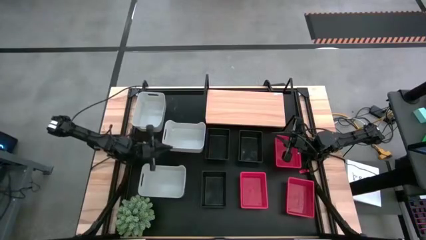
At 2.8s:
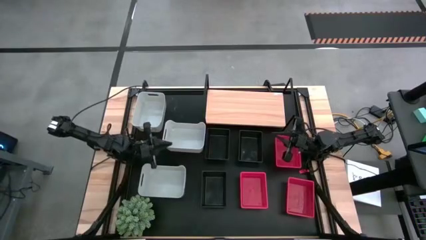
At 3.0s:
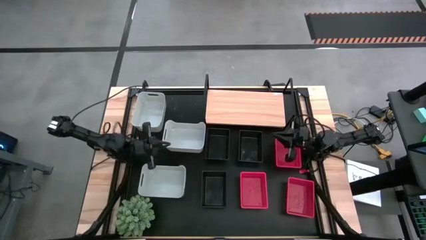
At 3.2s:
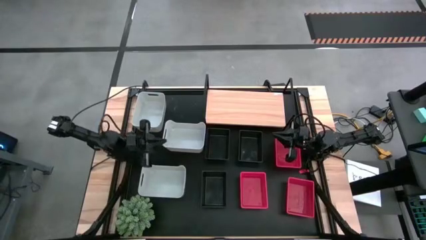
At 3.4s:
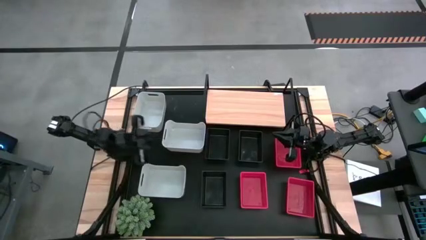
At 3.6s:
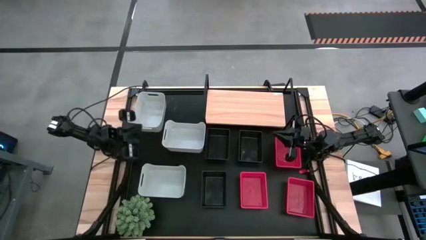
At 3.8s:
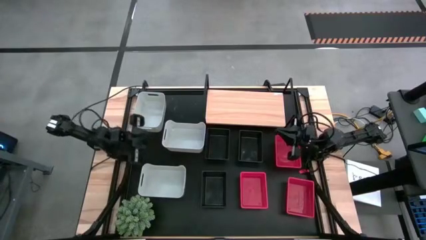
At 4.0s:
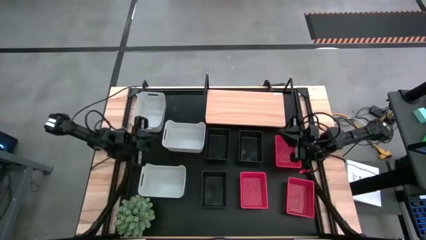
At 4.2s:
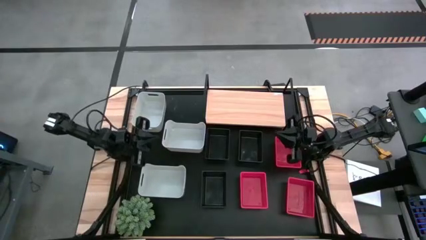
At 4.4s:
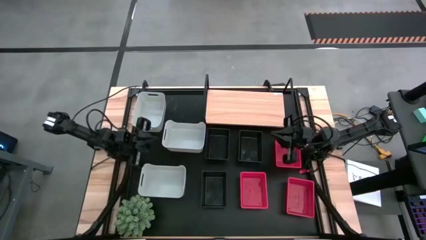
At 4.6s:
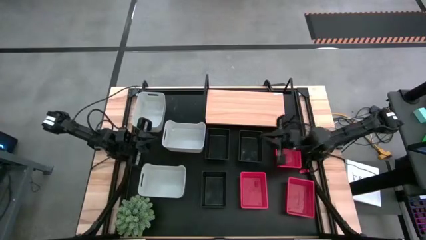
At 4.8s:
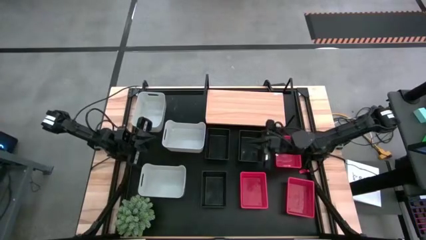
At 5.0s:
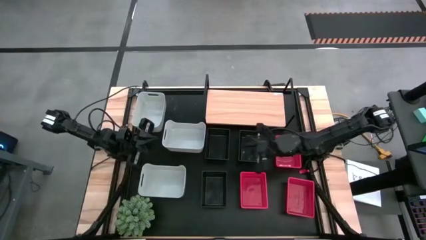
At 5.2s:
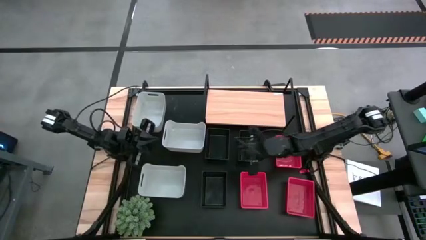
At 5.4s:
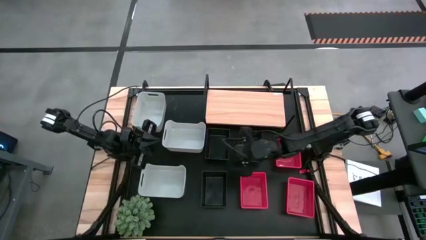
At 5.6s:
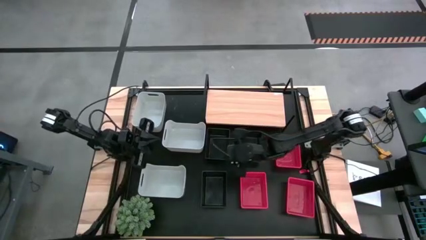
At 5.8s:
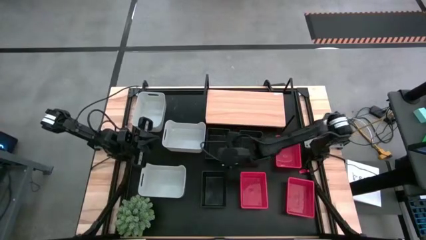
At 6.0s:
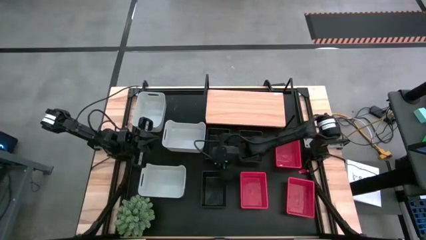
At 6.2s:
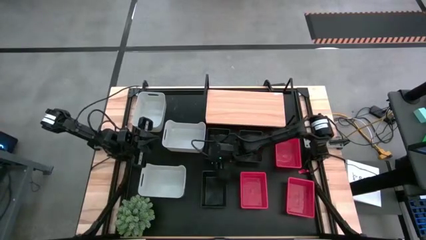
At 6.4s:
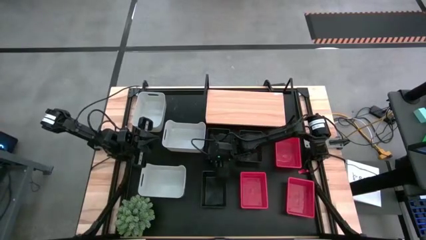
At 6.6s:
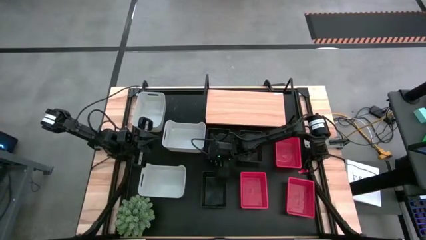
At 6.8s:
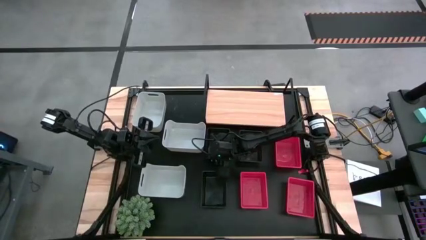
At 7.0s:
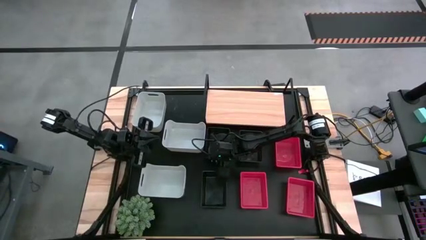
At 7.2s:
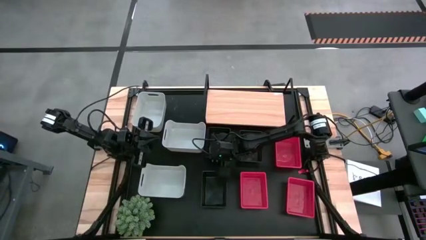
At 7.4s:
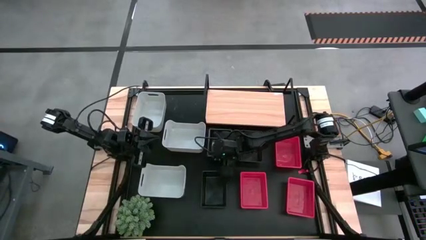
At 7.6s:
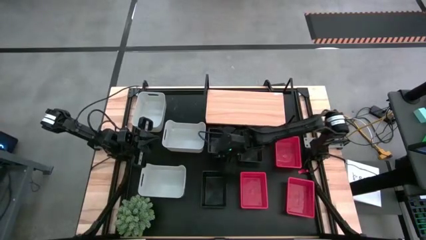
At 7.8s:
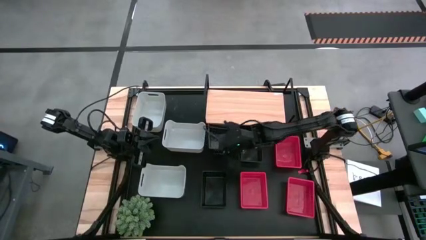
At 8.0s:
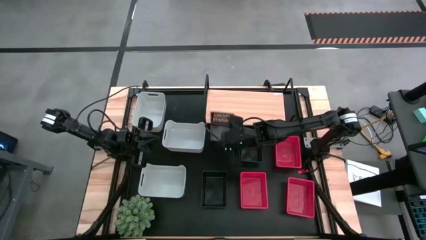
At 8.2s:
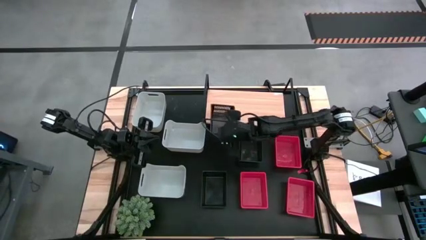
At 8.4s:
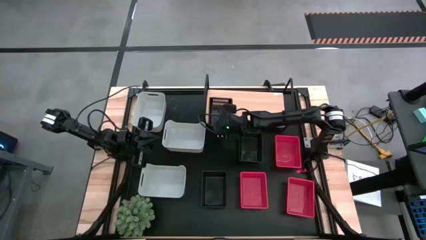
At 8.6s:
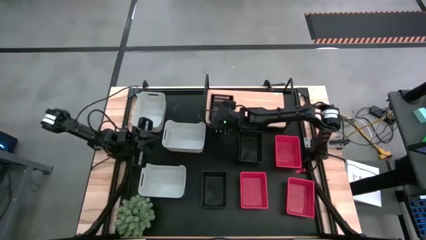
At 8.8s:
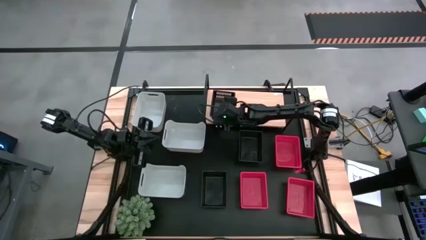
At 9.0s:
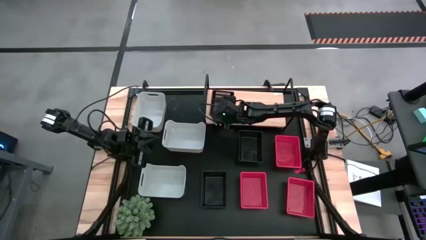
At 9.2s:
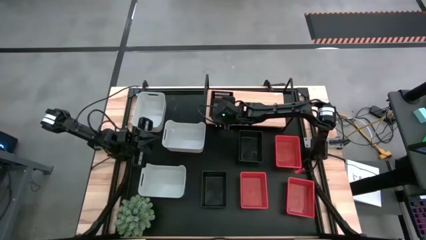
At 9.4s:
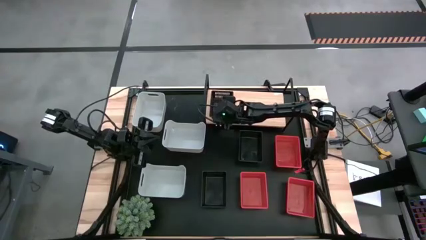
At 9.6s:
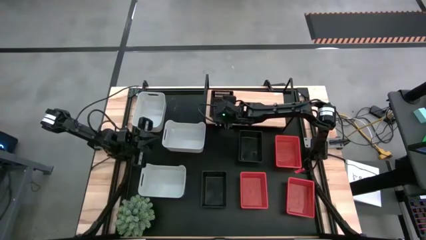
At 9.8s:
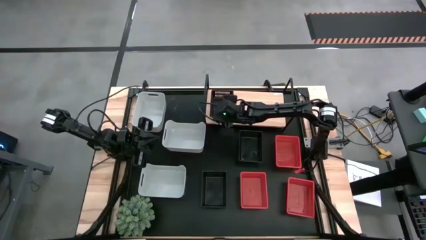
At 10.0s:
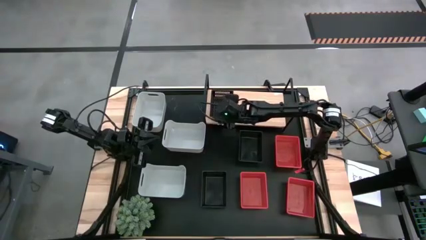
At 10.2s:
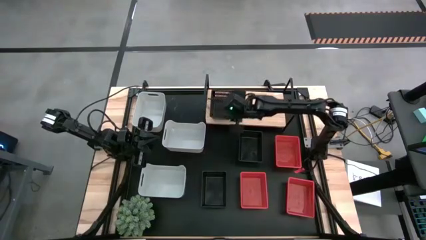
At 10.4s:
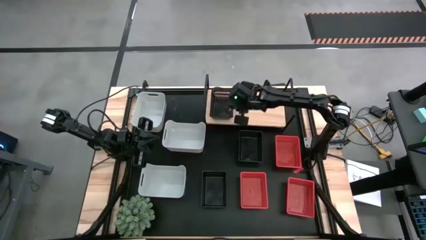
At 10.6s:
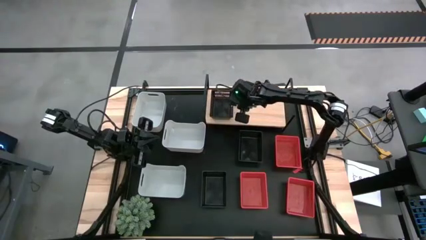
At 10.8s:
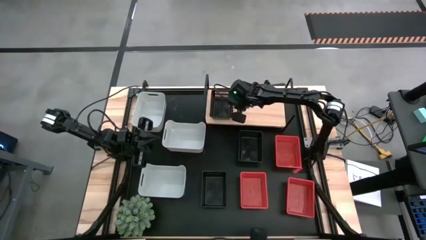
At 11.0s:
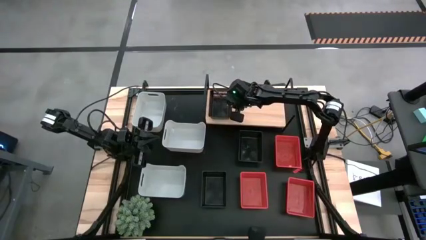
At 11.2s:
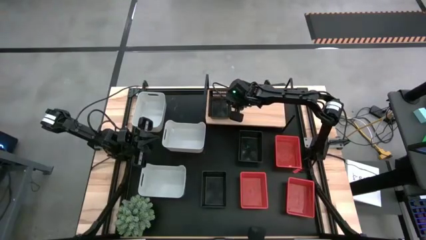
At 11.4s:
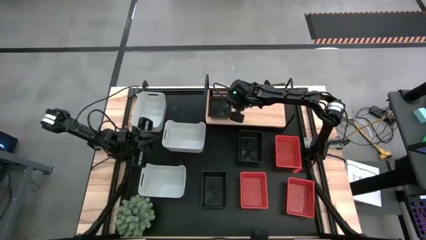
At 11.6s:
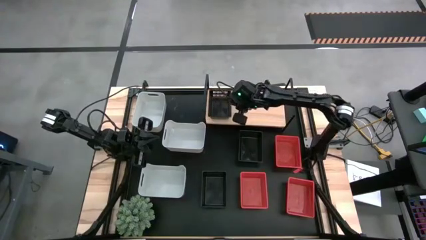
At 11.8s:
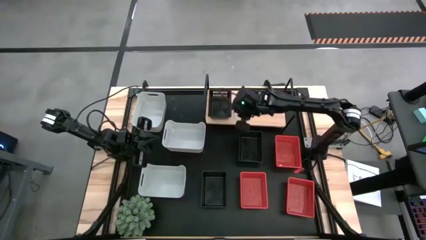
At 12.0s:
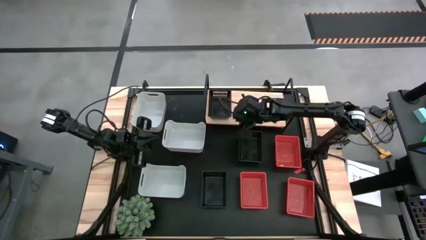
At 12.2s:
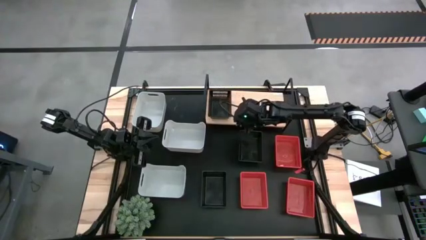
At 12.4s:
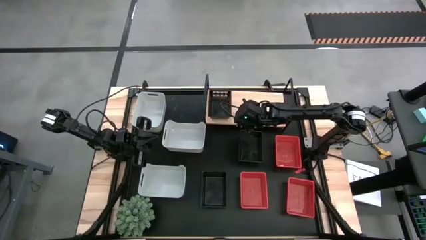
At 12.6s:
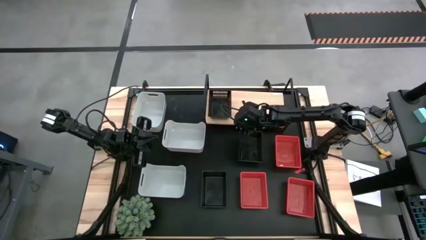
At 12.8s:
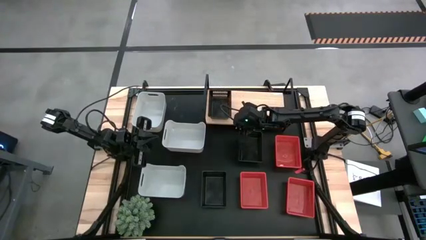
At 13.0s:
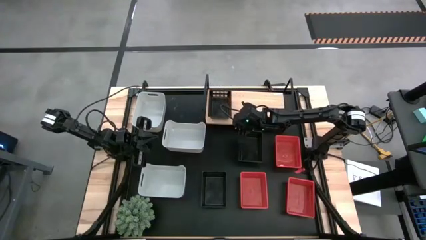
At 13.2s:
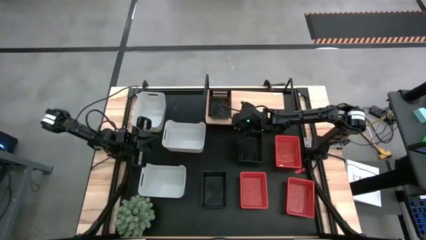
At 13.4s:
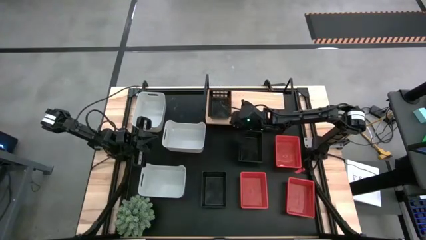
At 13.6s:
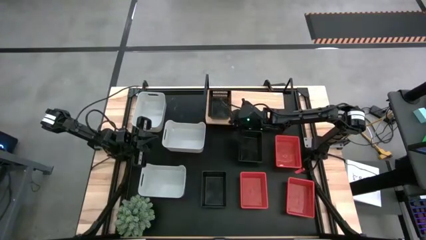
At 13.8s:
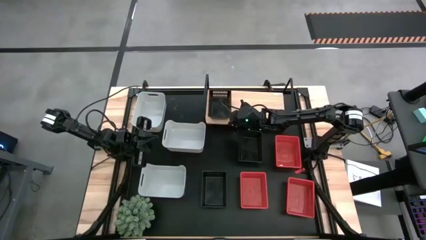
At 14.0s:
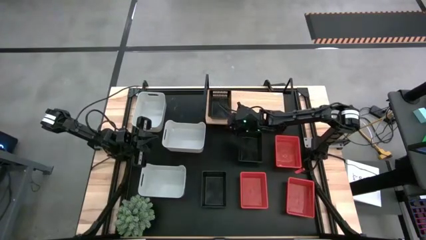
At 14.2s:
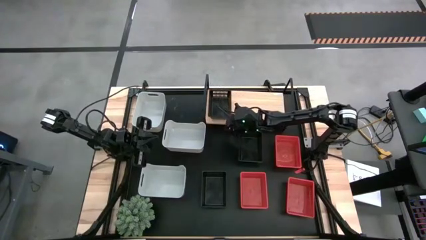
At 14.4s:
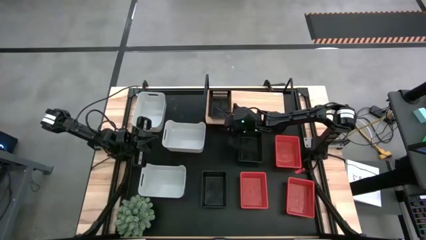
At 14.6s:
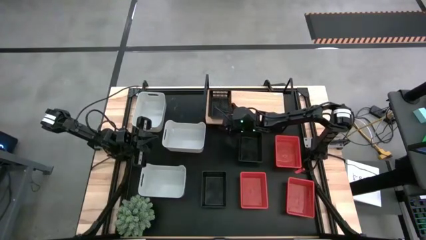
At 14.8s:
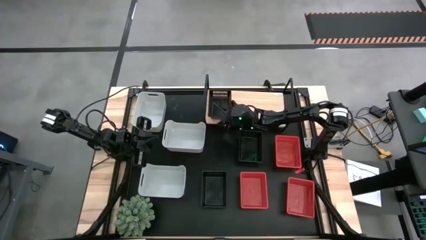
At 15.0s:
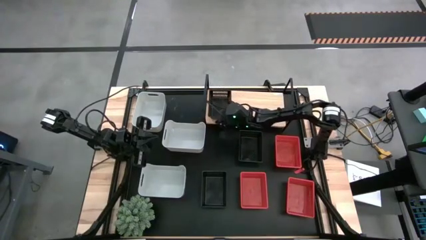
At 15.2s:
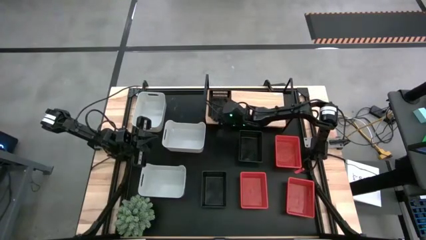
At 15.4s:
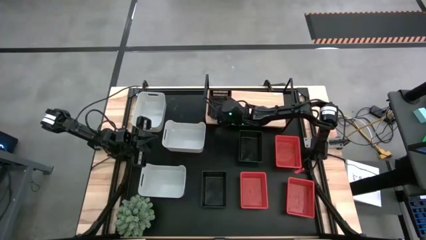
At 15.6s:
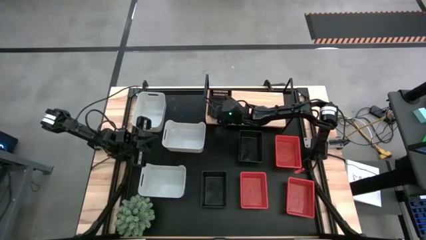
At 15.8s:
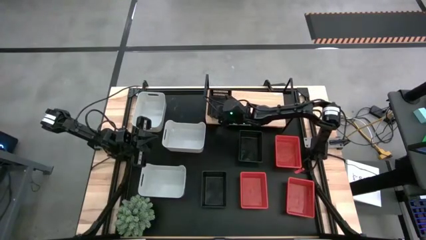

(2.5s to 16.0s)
Task: Stack baskets on shelf by color
Put the top left black bin on the shelf
